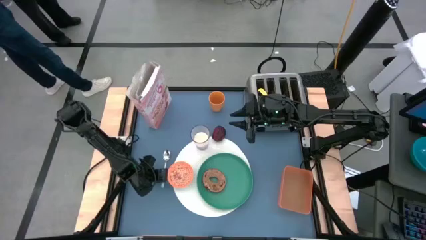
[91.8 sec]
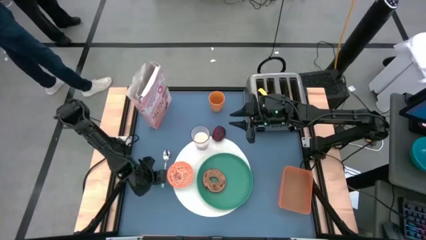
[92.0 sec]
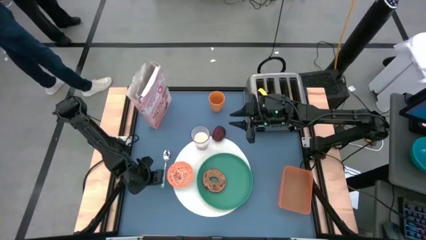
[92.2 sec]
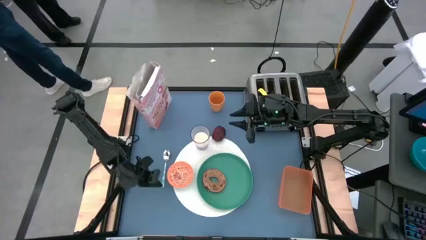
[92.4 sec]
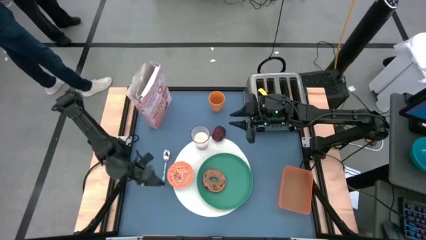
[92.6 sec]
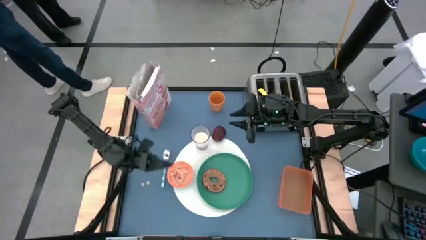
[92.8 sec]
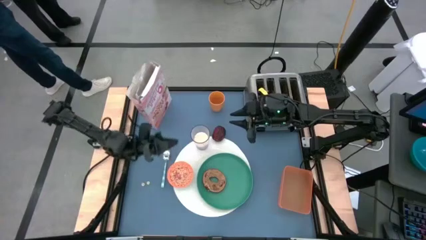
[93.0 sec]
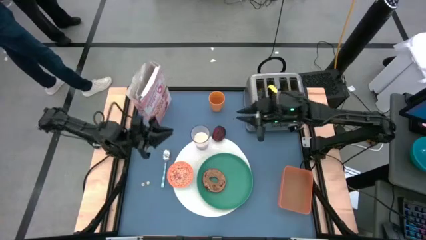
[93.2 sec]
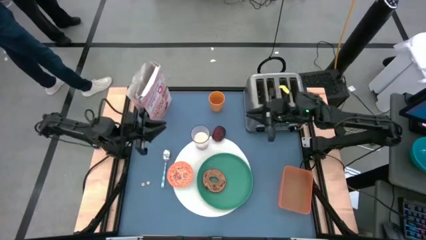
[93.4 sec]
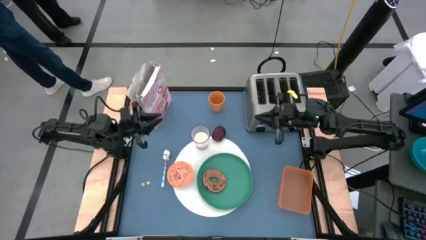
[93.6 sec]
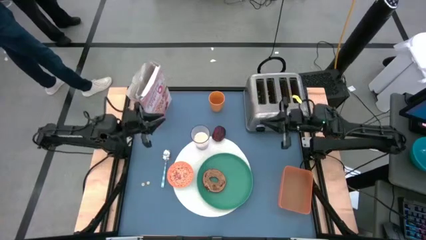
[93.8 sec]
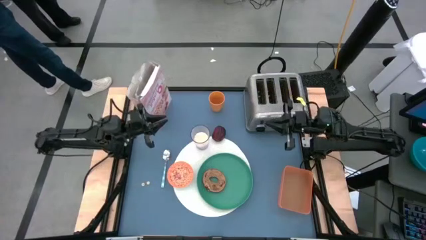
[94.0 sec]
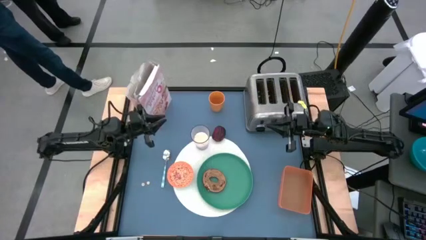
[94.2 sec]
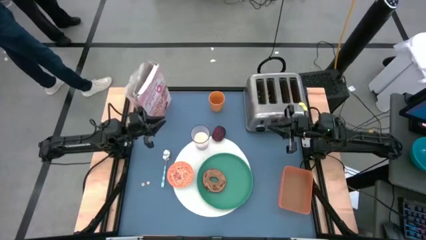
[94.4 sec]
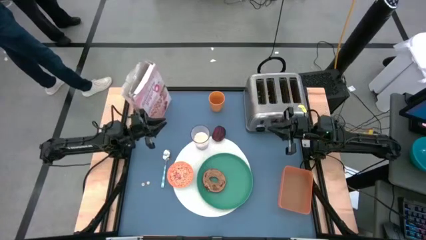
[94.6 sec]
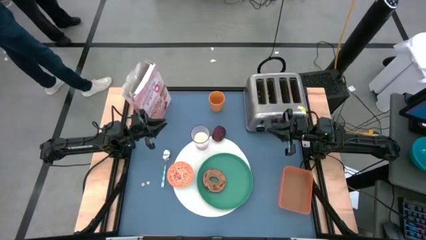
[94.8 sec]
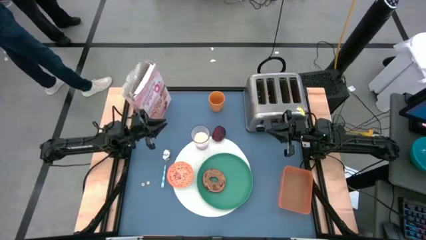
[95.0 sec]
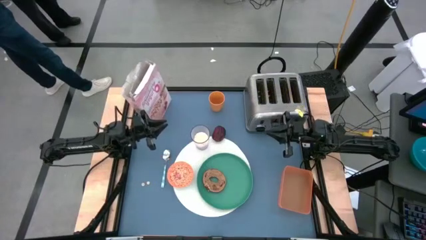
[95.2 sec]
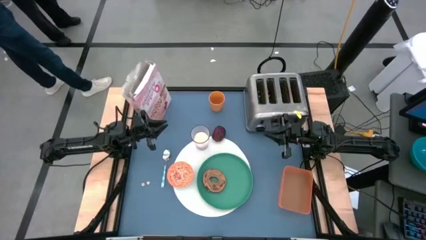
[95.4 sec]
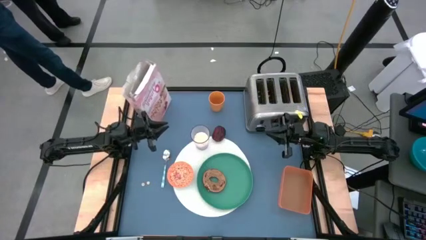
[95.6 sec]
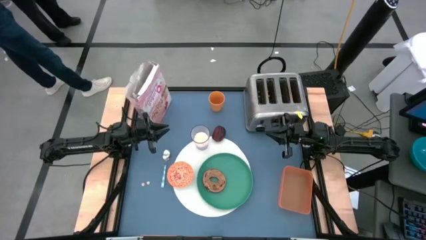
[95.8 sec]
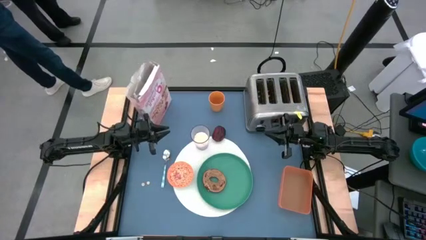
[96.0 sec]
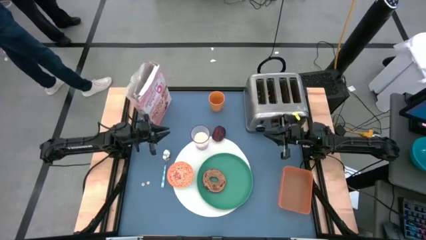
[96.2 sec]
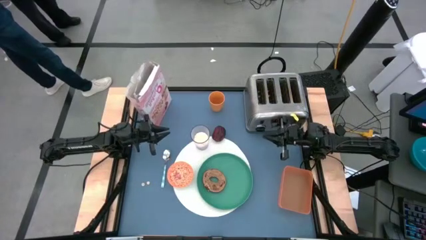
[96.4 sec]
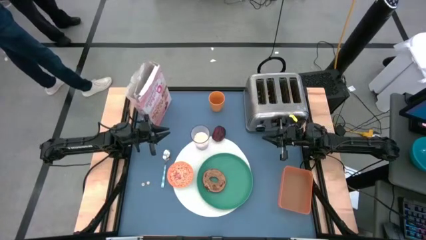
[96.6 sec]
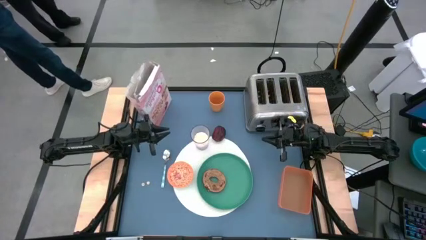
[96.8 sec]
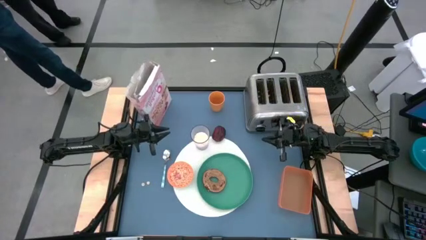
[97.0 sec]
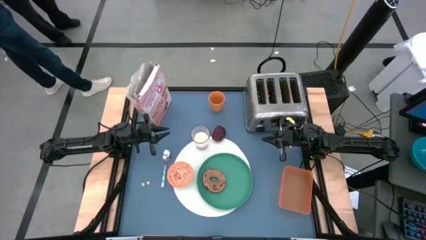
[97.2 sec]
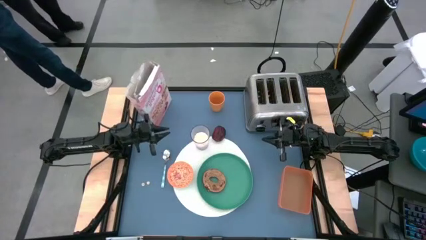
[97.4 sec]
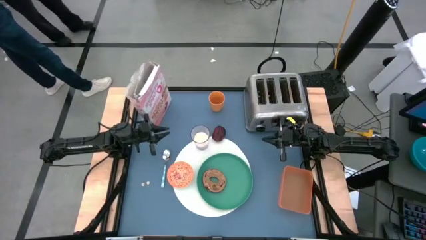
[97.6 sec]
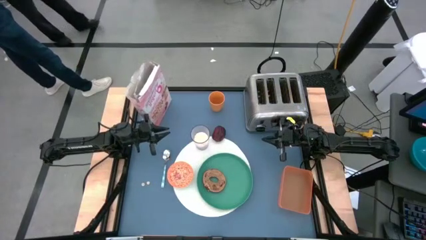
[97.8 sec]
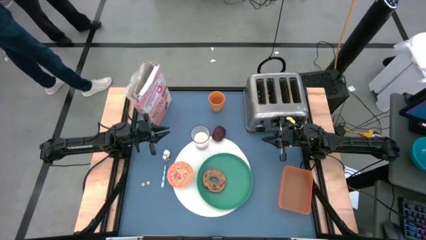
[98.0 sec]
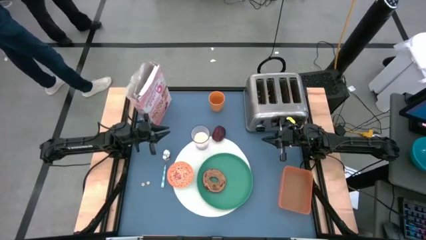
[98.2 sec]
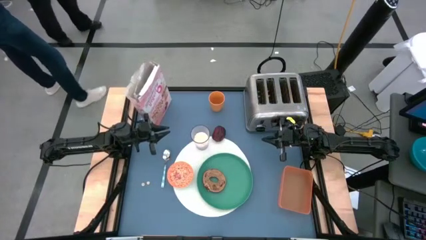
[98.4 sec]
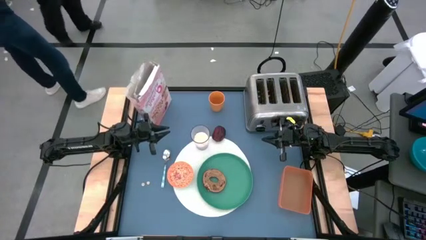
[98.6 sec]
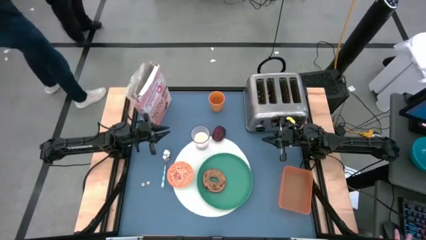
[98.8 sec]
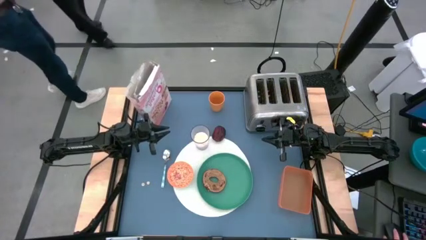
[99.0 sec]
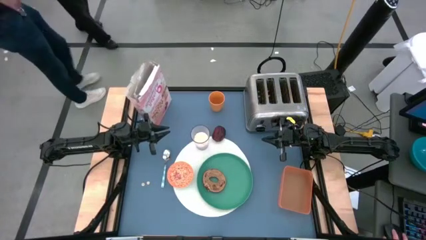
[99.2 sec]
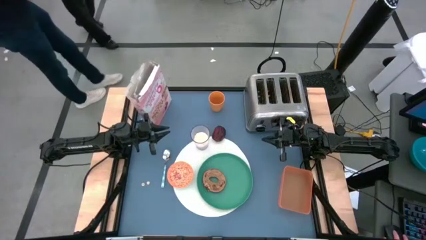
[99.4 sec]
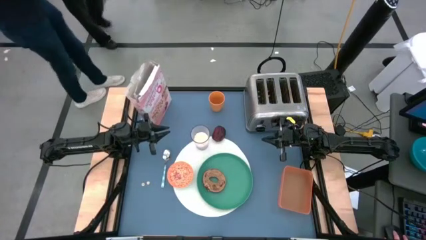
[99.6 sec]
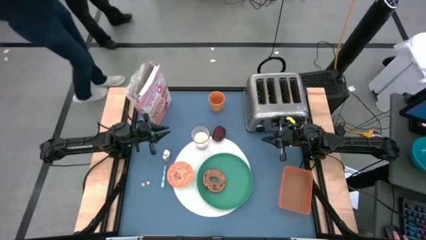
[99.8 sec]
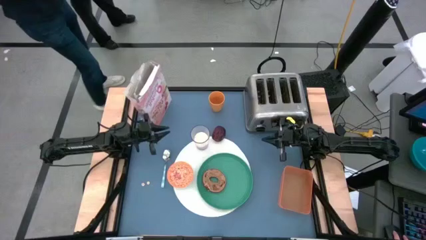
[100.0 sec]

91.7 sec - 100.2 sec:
Task: Arrange a breakfast setting
Return to Home Position

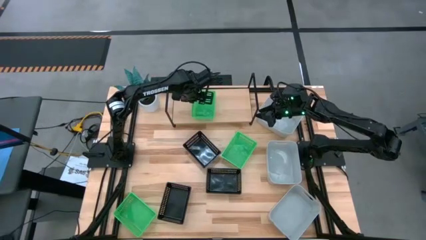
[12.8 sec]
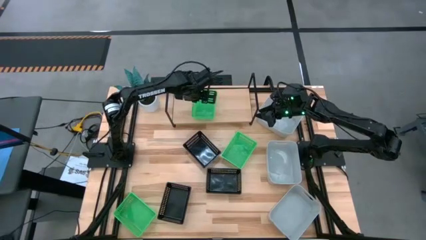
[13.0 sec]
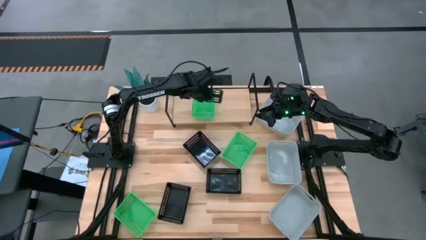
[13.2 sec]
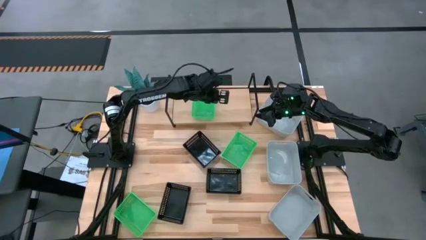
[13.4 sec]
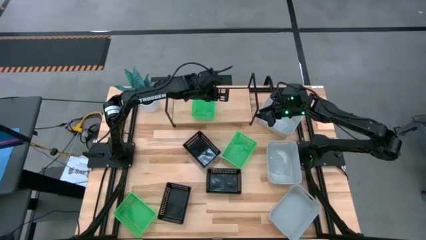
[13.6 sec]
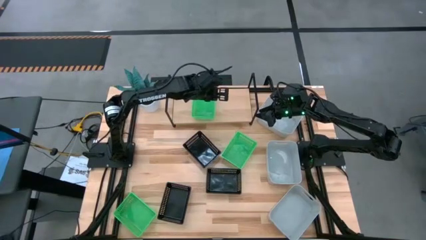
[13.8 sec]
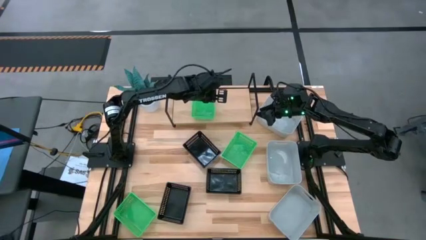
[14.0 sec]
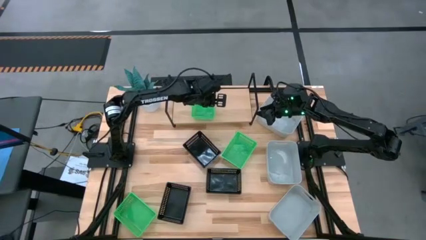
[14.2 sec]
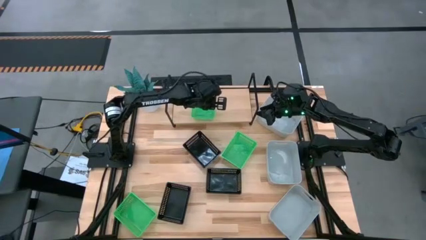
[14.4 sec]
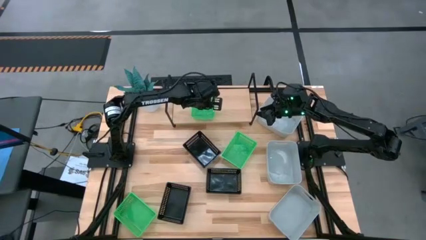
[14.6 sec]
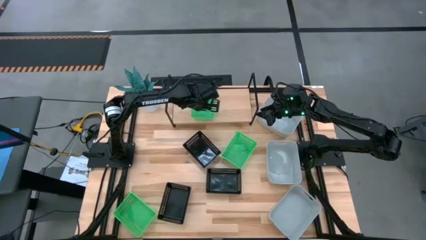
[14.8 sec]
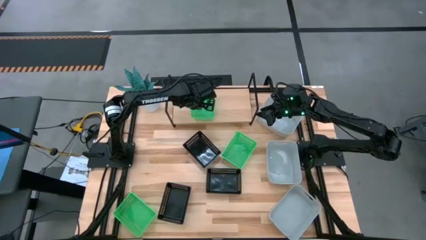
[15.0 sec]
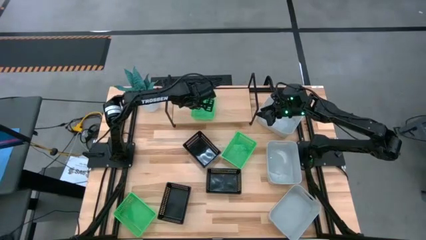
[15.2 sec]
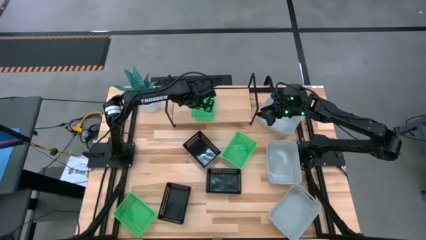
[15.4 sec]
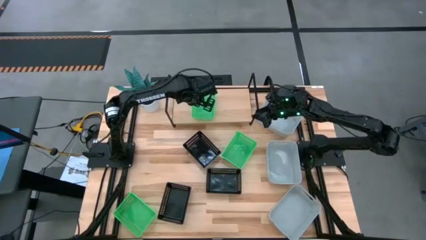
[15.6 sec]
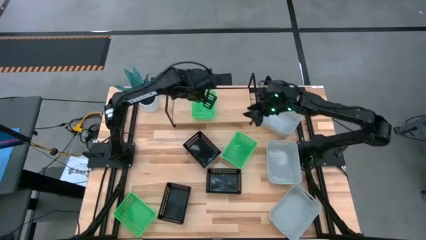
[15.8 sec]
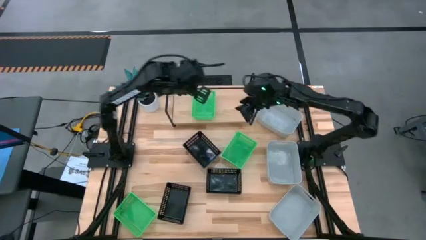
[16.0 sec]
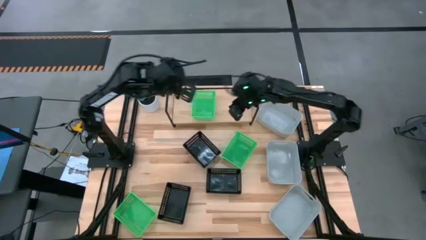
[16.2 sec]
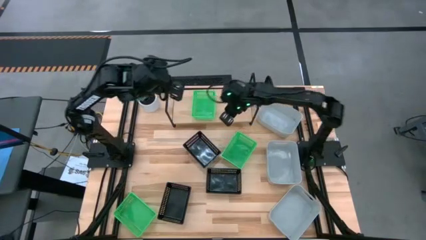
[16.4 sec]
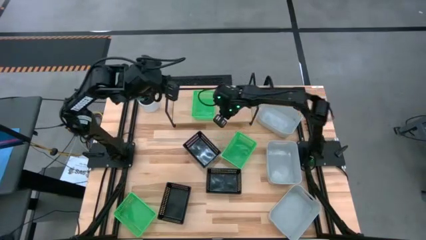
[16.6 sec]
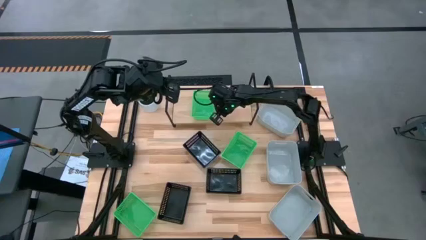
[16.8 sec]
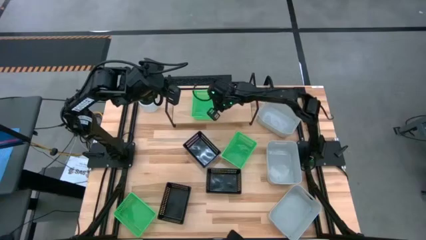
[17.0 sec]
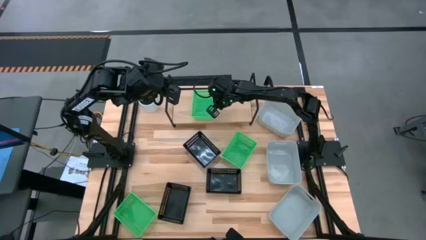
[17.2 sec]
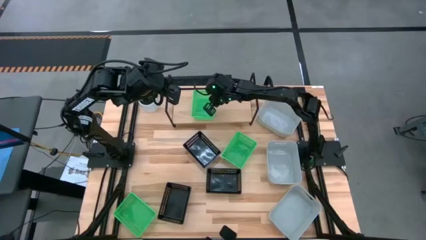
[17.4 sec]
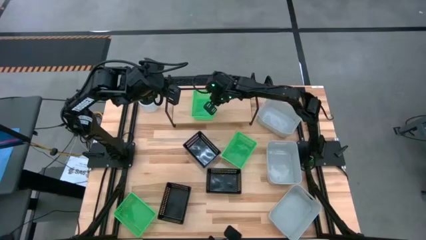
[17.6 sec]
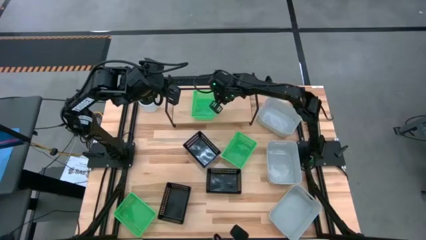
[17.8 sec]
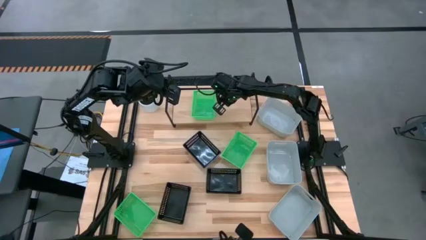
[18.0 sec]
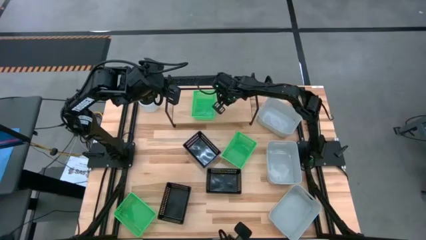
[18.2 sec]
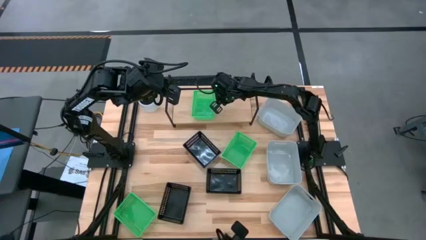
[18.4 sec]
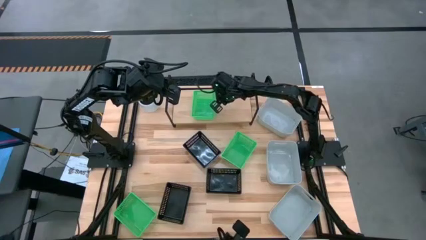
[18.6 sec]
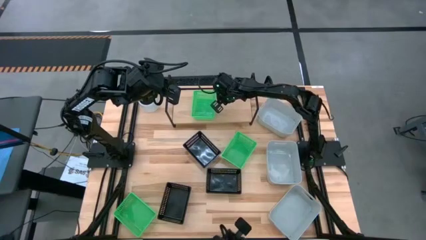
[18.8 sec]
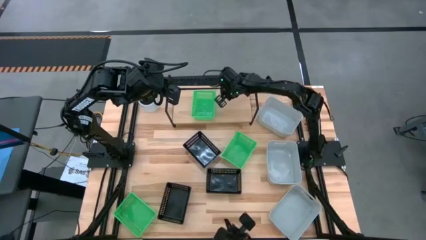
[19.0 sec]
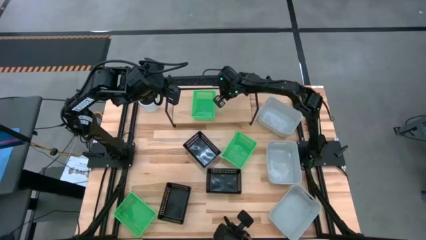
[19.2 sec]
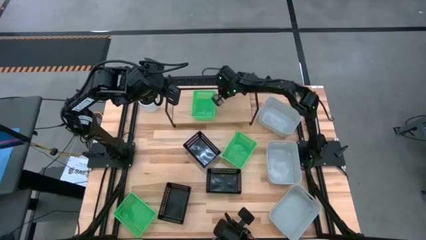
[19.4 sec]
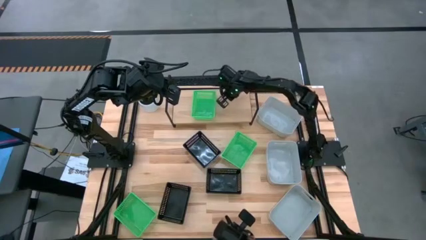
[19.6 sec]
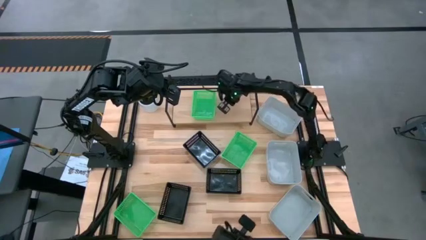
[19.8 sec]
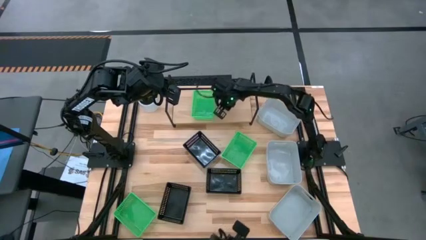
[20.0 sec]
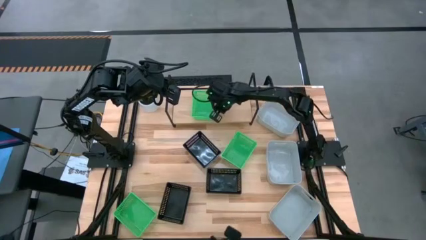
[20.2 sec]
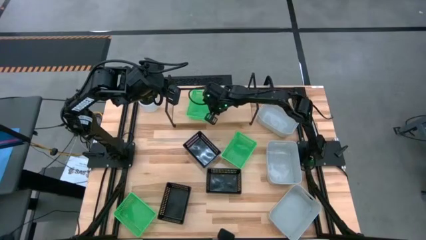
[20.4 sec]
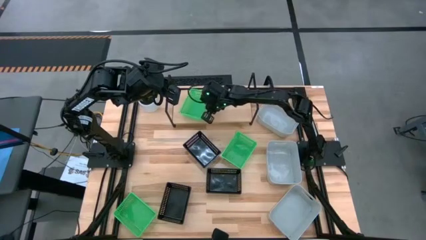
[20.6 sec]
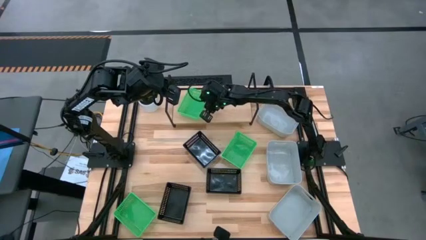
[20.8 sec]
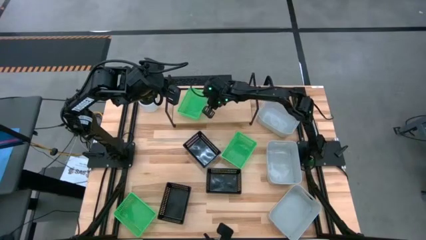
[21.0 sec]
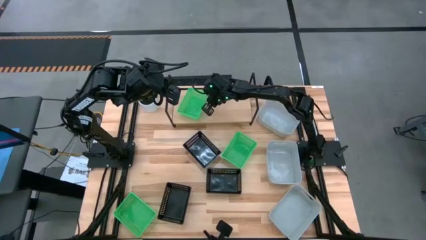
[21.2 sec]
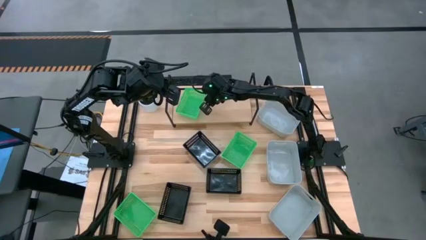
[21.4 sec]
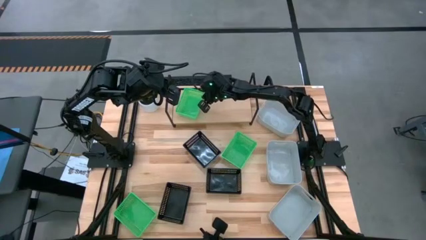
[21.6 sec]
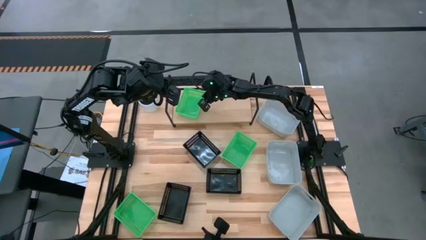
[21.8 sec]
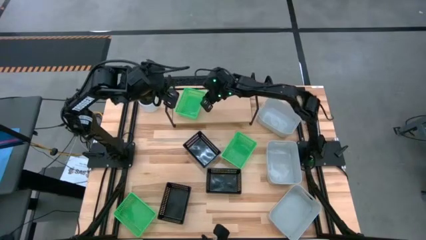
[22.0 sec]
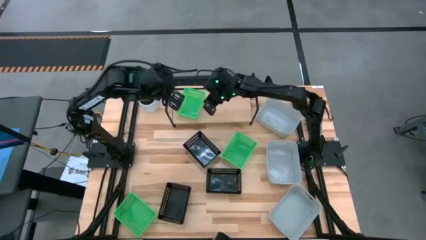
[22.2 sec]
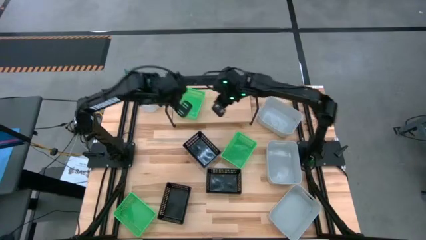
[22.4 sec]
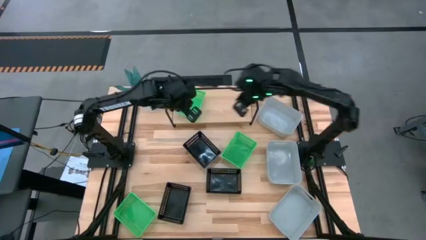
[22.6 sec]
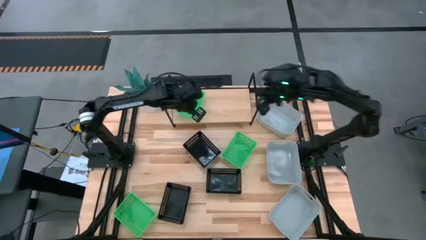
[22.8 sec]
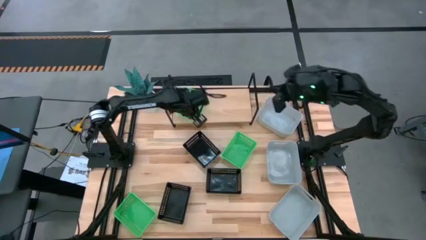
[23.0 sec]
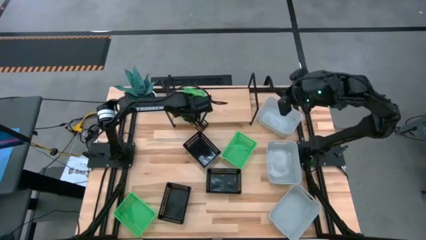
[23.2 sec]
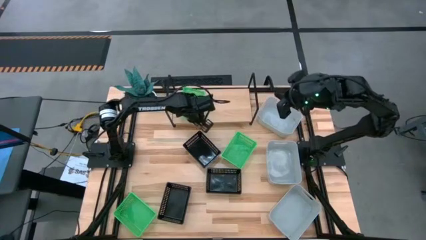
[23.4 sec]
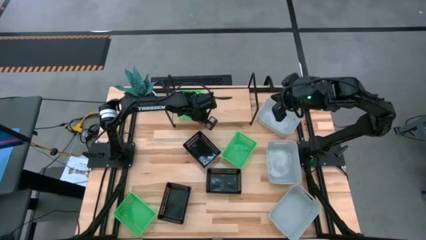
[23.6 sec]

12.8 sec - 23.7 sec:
Task: Stack baskets on shelf by color
Put the left green bin on the shelf
